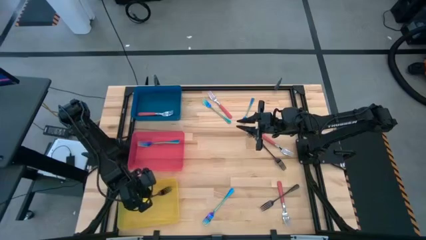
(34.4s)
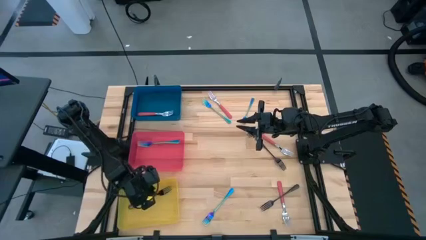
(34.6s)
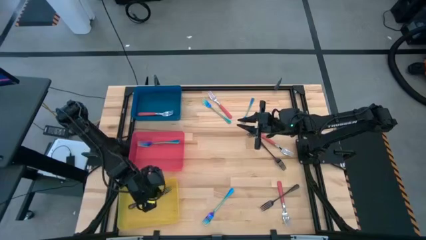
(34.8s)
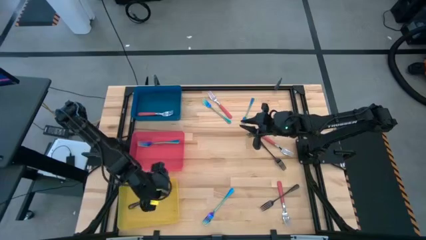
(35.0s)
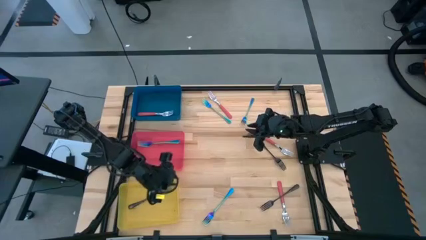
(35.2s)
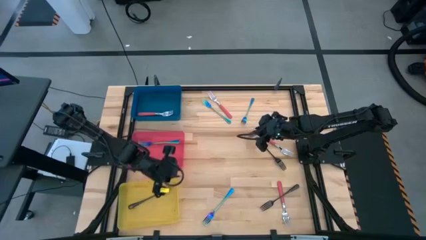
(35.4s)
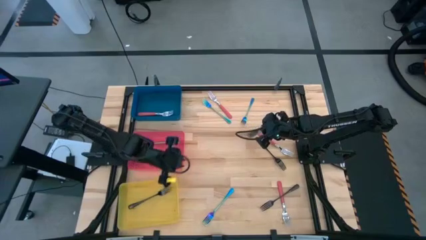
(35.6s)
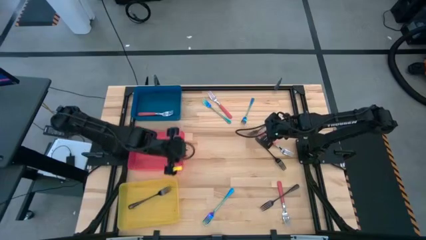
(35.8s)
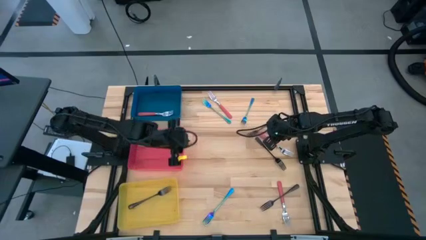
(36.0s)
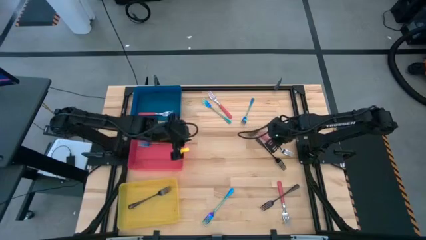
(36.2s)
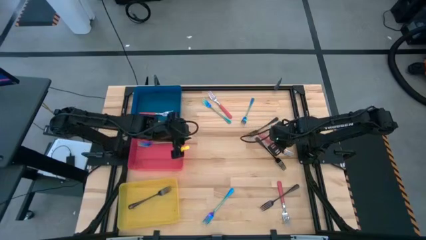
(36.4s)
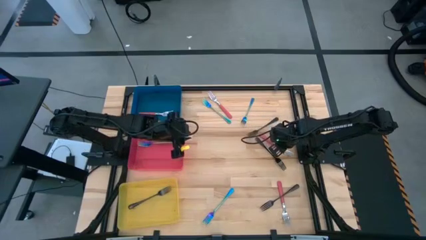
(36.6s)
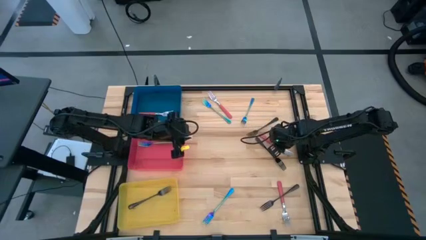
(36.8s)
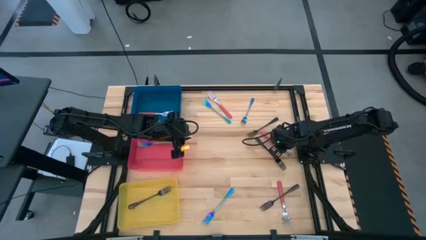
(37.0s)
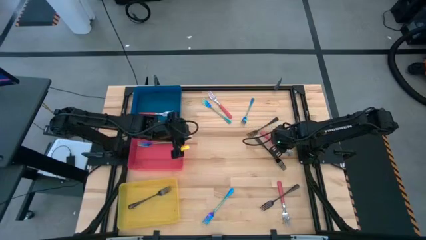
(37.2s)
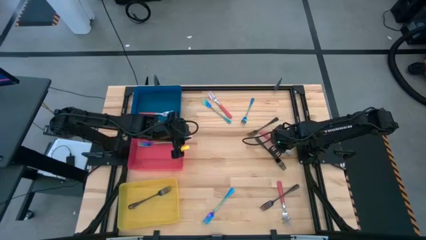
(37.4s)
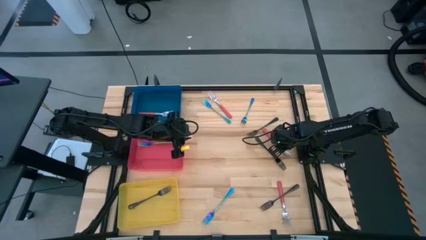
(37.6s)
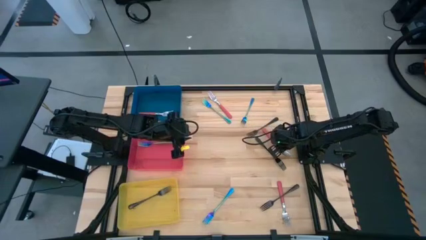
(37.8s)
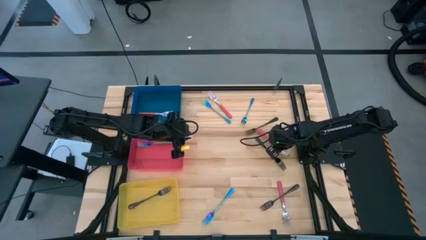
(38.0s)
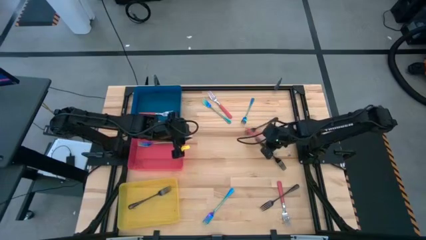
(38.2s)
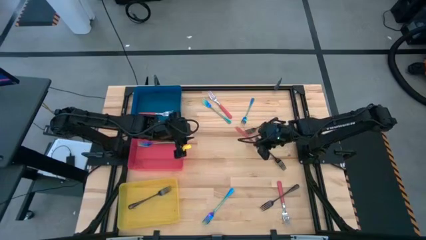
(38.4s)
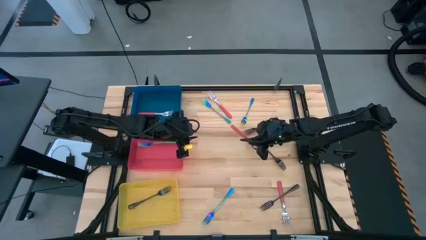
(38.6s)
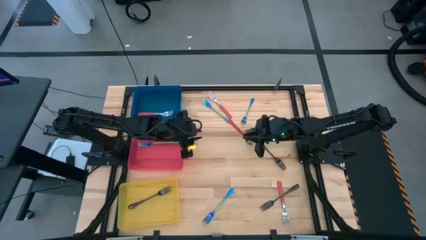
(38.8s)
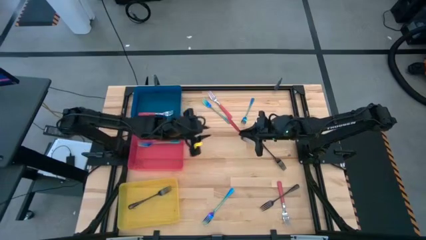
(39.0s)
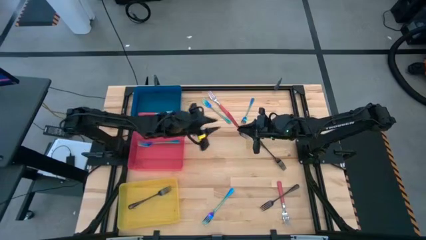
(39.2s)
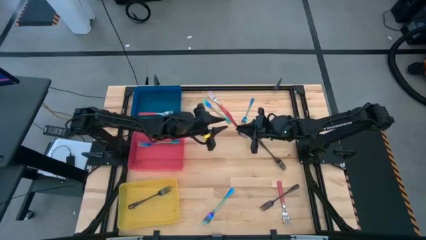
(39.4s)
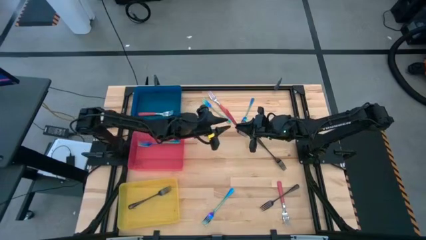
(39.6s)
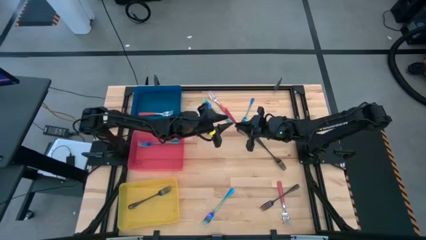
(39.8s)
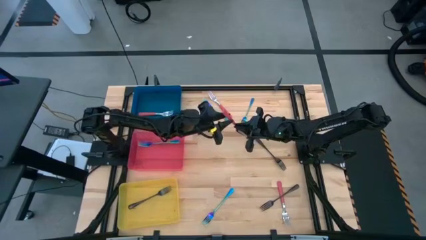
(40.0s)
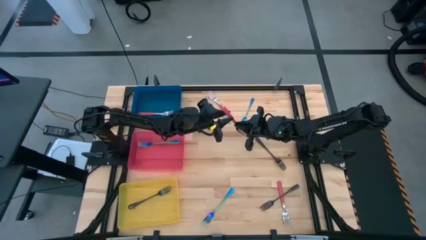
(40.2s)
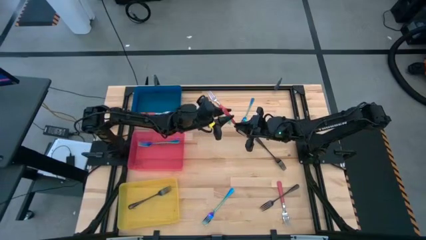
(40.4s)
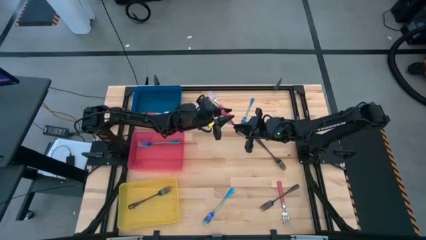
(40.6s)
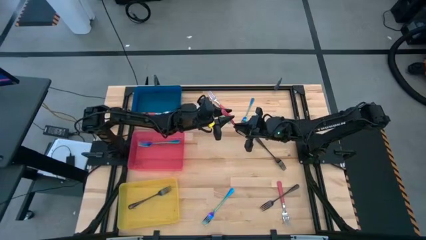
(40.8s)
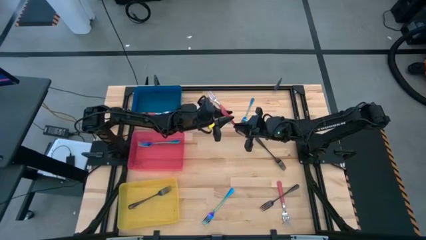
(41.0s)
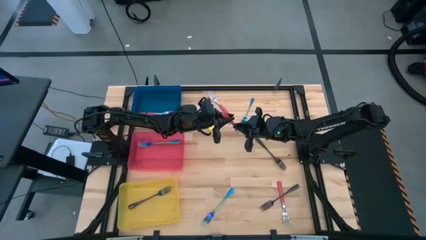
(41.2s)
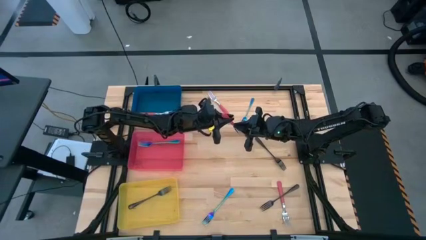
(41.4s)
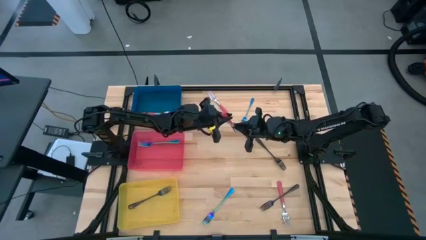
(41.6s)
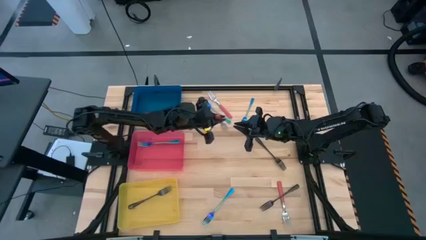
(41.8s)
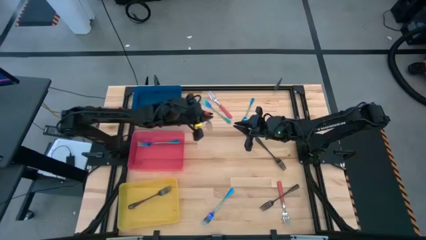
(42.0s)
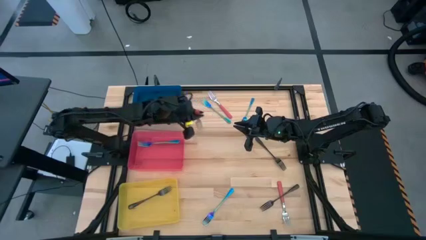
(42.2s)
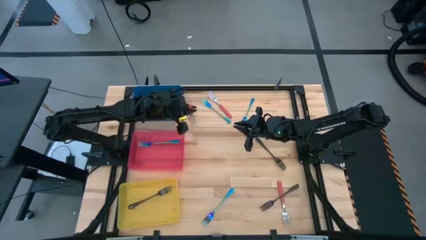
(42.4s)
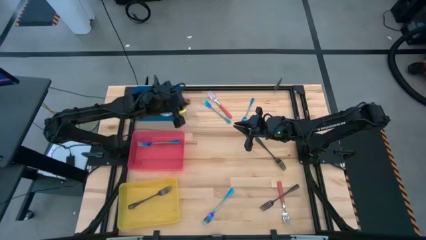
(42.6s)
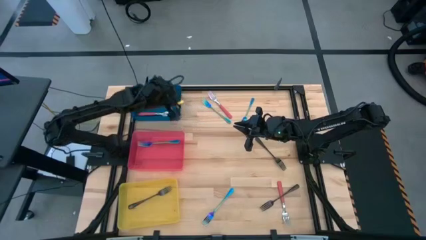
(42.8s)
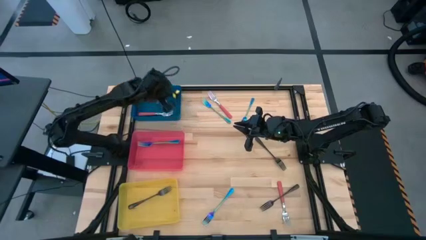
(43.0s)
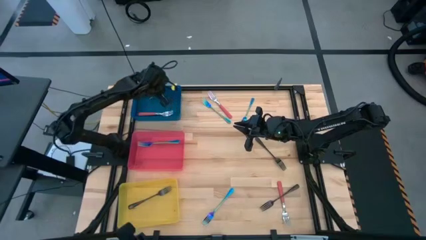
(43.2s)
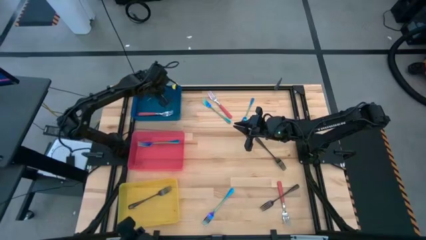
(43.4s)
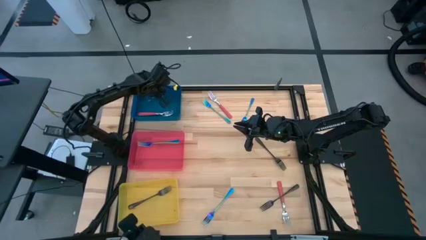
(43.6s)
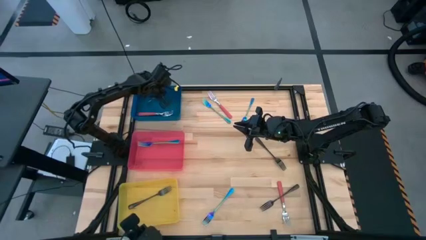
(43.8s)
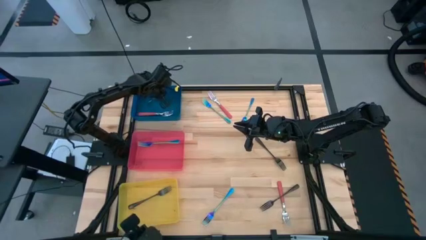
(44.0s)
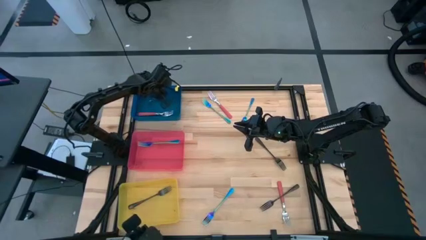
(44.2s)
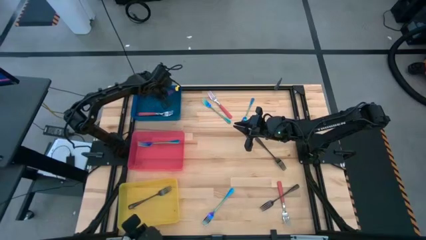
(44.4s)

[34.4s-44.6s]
Task: Sort silverware by color (type)
Put the pink fork into the blue bin

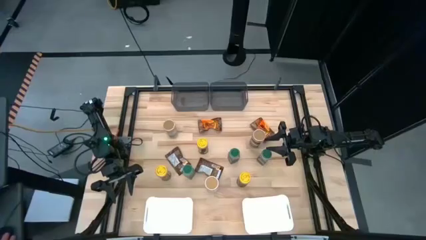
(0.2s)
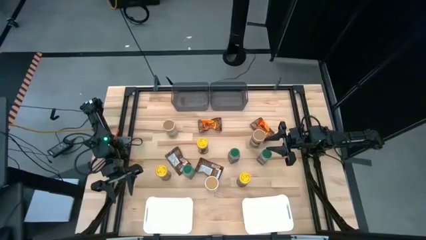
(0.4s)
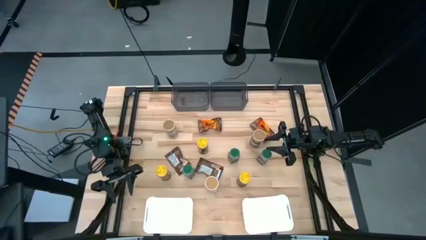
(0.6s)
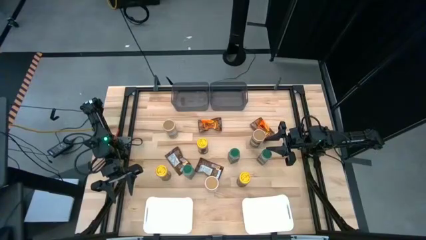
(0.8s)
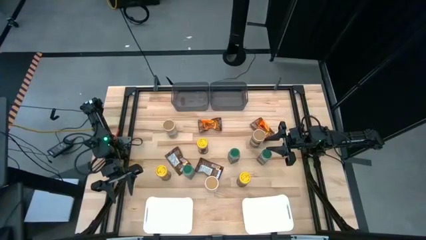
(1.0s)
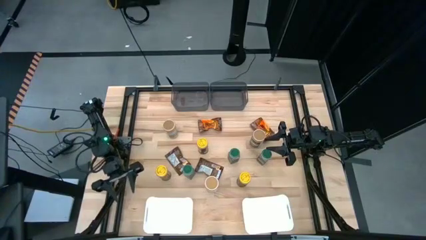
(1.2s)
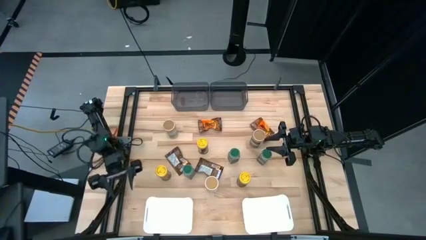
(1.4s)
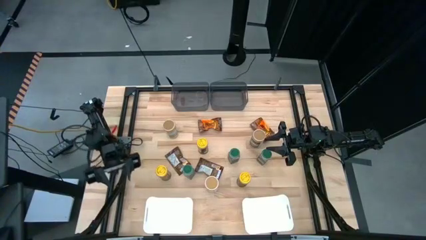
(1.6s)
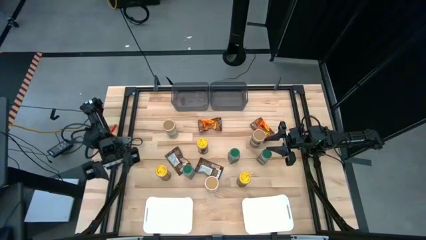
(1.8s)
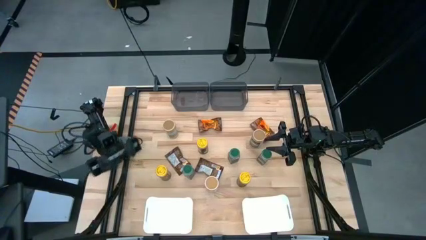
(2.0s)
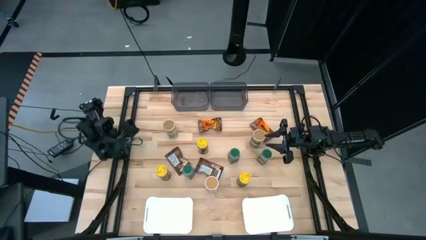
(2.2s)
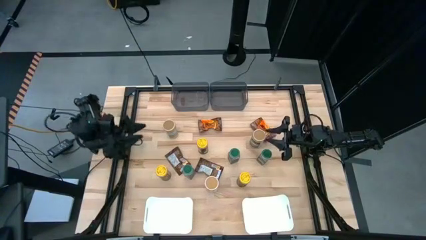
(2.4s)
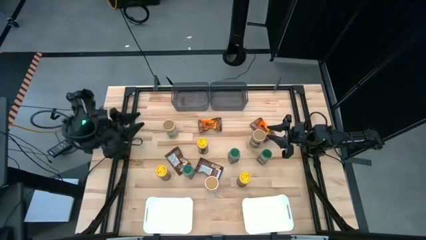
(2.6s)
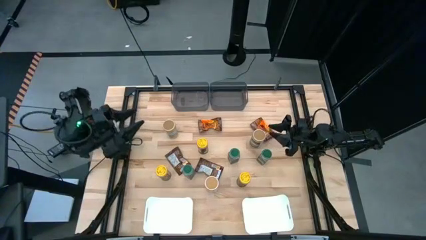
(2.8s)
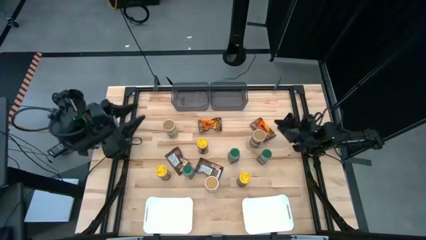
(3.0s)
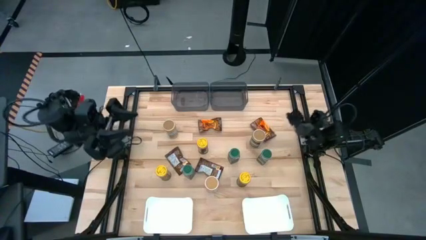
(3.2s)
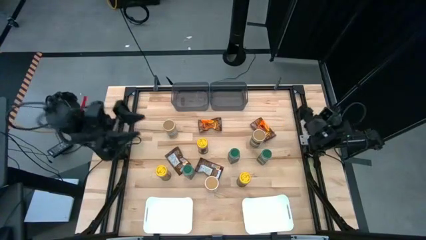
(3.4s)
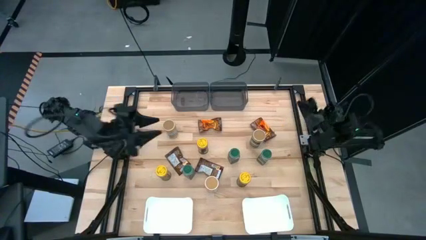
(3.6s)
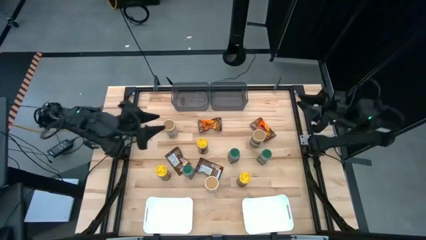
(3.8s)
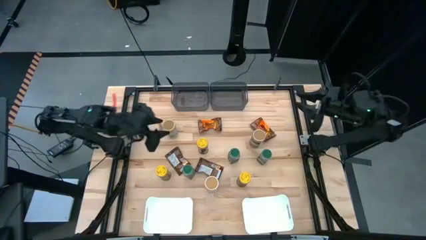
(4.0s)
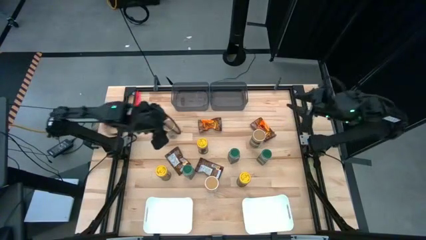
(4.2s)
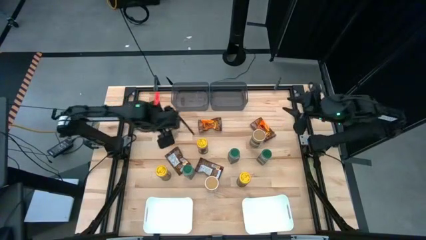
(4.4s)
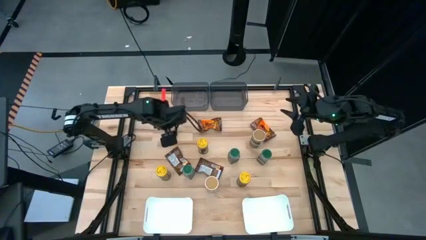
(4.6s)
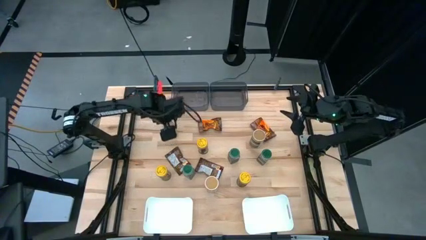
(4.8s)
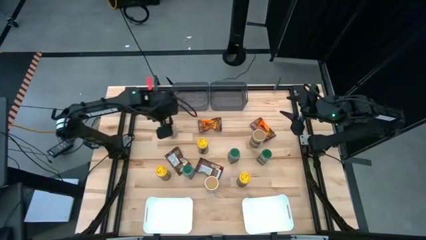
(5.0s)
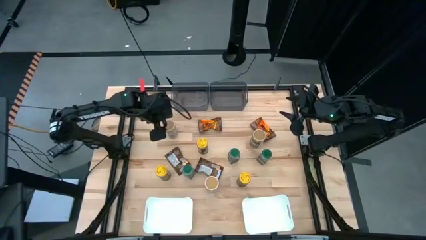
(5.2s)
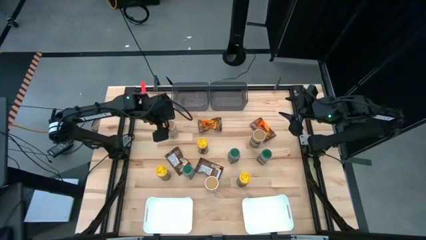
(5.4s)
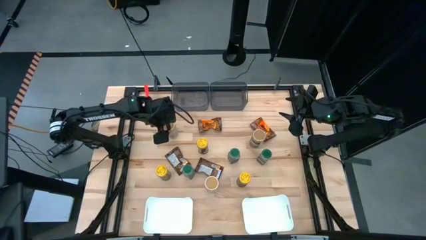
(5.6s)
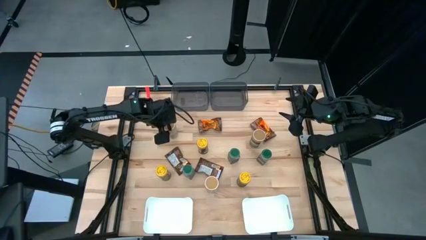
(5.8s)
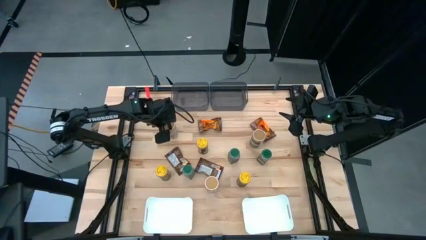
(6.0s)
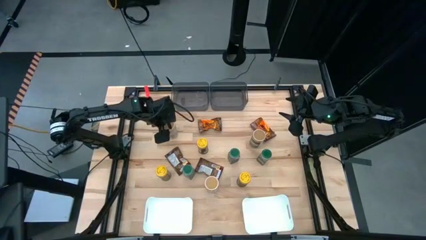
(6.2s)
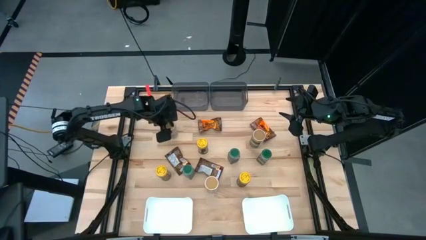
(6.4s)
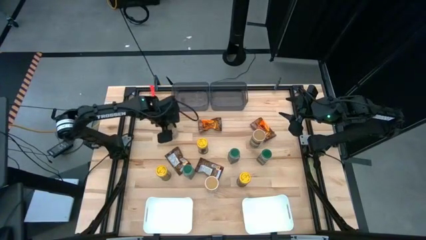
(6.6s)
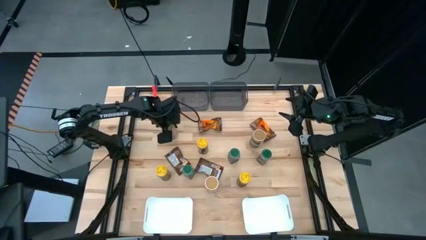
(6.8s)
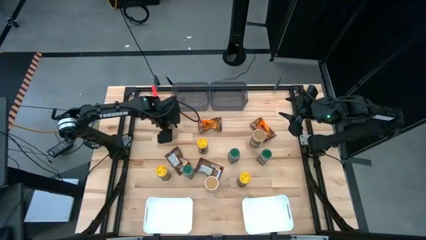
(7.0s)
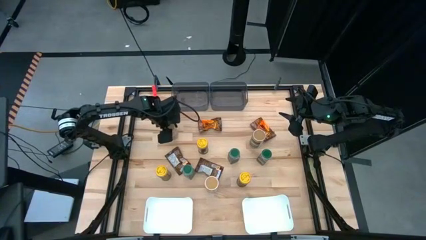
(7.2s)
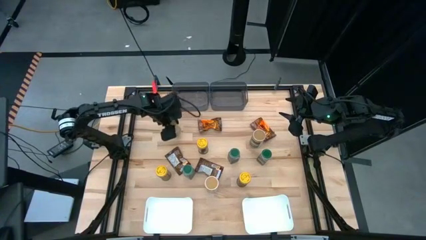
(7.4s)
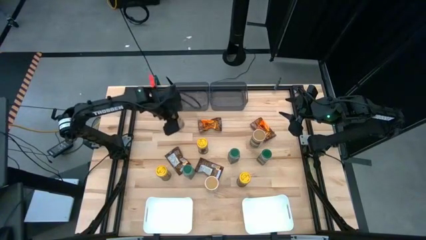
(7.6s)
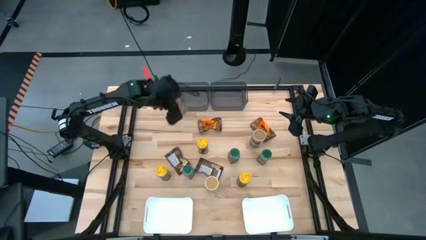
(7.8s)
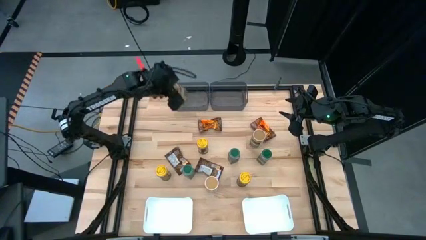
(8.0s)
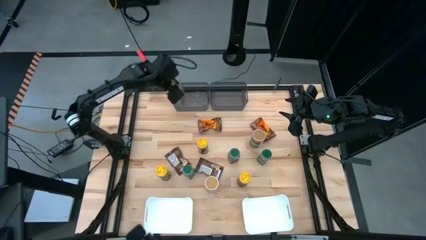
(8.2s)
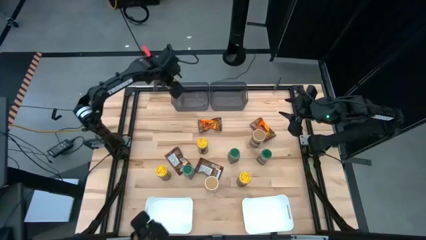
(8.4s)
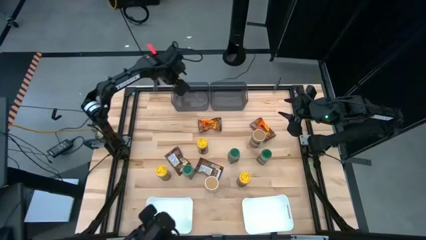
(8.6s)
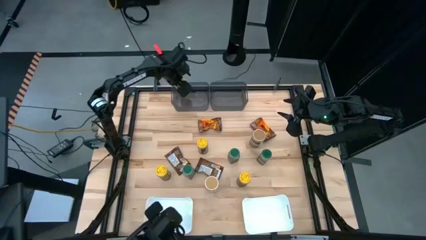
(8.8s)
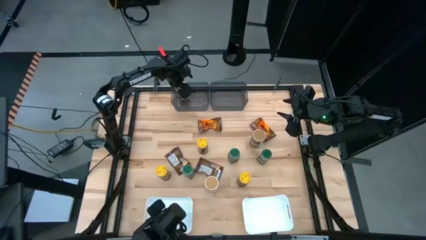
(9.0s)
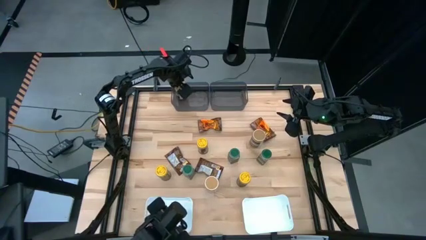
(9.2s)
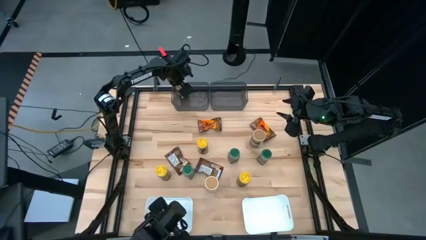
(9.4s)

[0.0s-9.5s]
Task: Sort spices by type
Put the top left golden seasoning bottle into the left black bin
